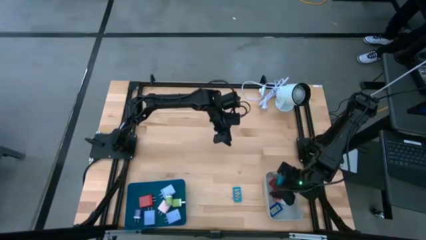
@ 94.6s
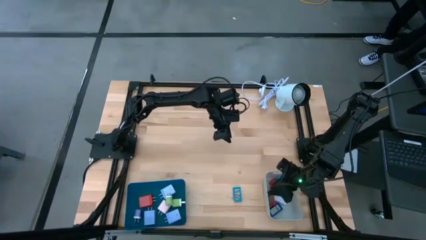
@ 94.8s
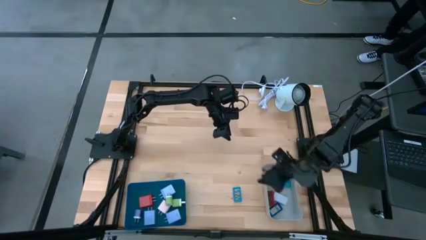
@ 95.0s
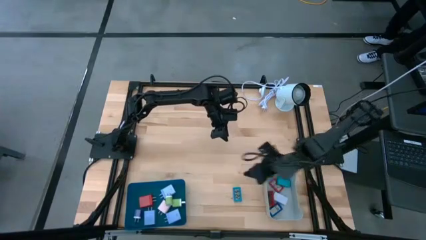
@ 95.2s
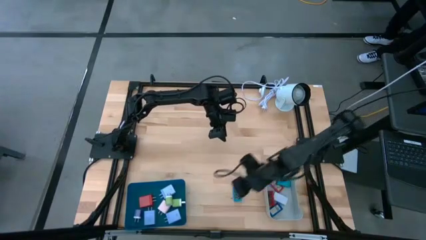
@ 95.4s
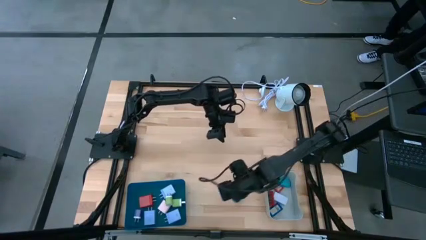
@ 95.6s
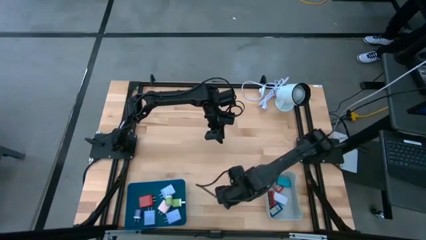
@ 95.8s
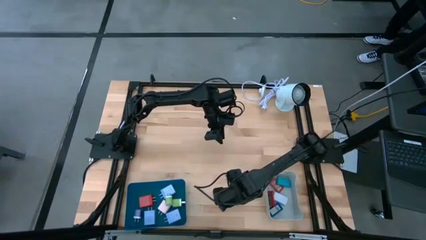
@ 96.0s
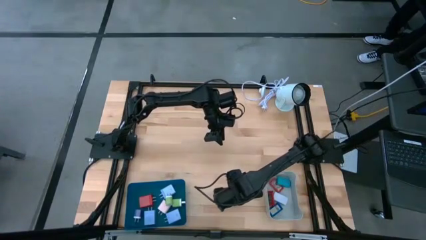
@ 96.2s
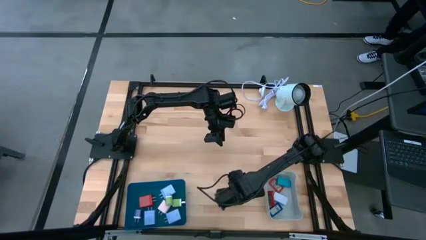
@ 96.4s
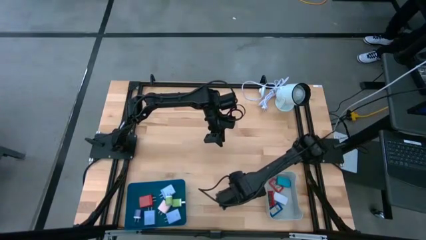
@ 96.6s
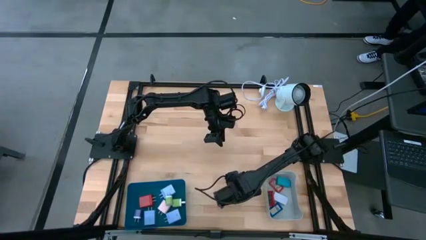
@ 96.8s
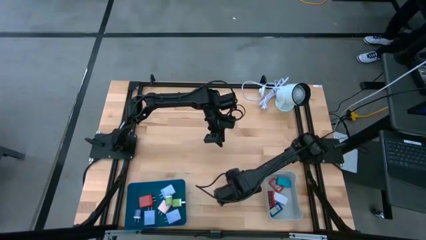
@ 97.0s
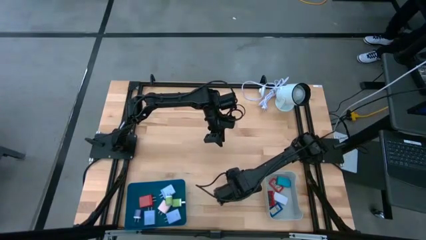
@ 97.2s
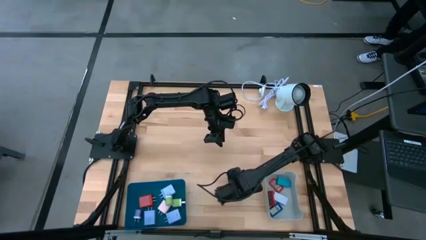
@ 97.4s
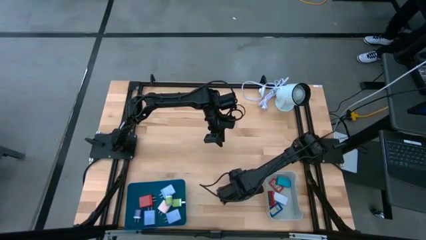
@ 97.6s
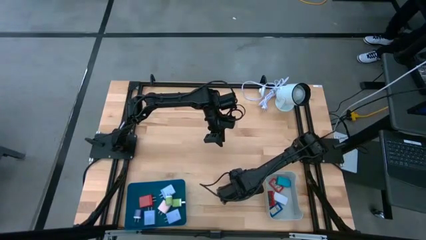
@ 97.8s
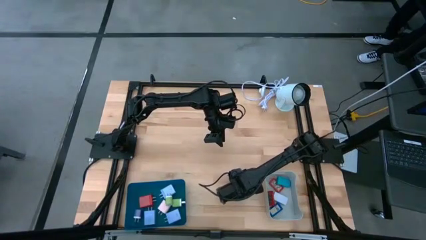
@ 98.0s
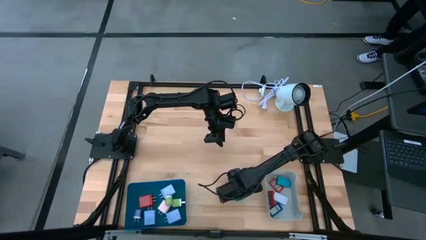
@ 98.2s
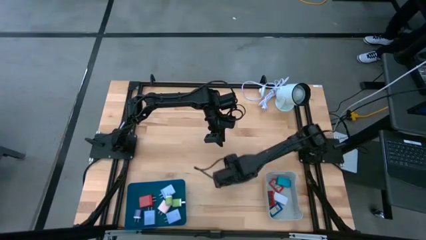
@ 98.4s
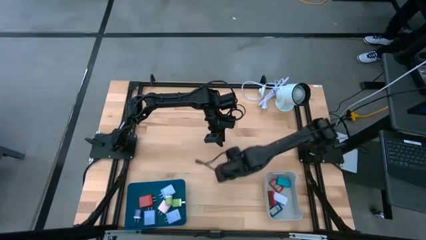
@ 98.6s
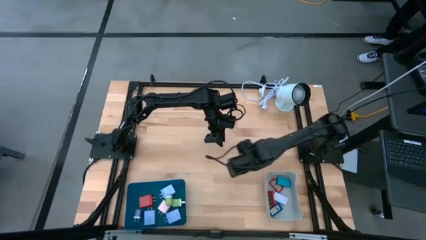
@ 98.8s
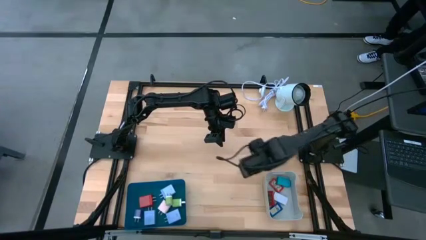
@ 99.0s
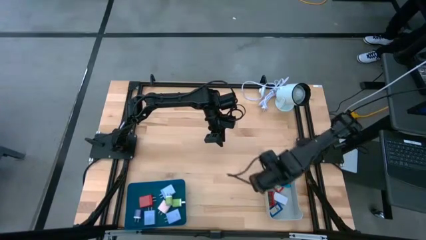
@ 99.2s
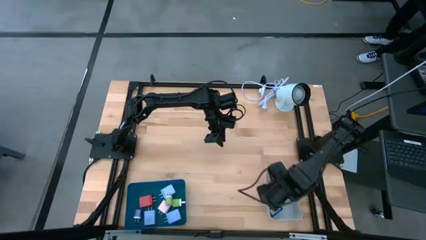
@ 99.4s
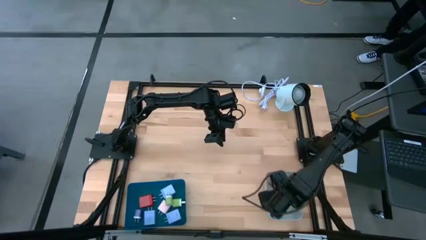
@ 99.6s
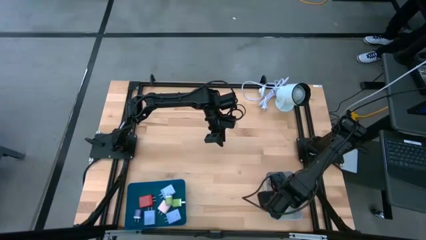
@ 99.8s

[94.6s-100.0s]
Task: Pick & Place Office items
Put the light blue digital clock into the gray bin

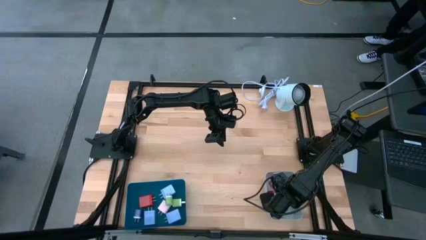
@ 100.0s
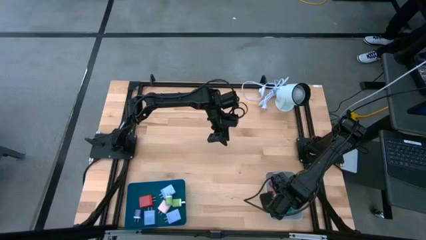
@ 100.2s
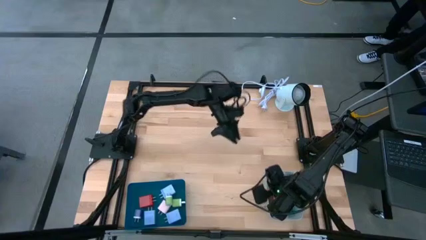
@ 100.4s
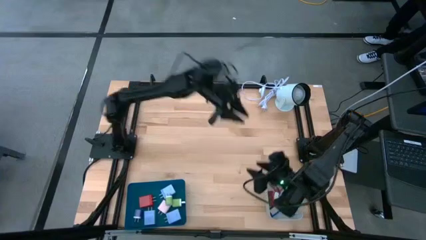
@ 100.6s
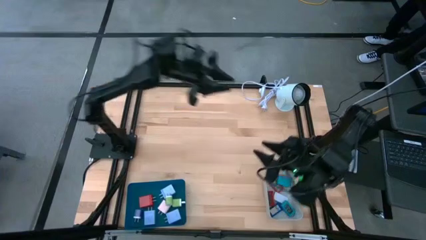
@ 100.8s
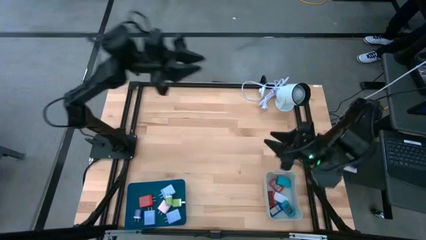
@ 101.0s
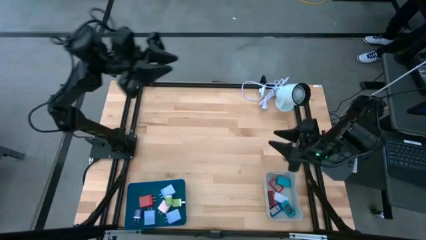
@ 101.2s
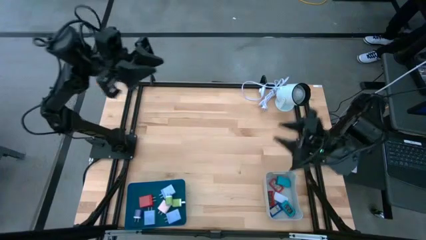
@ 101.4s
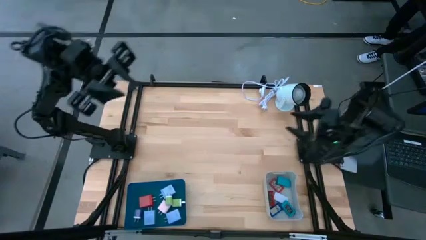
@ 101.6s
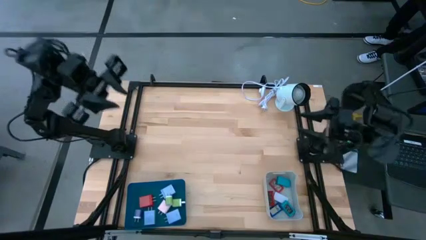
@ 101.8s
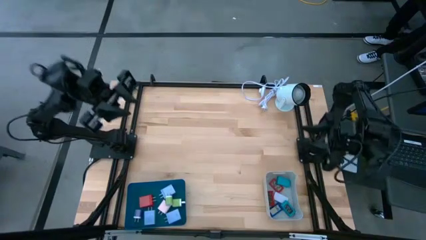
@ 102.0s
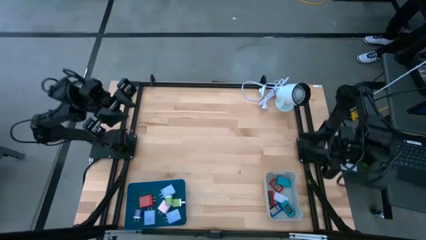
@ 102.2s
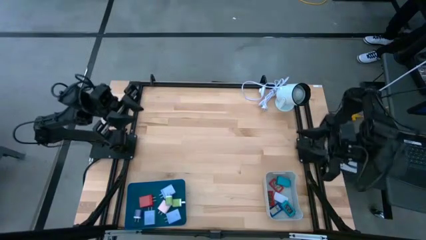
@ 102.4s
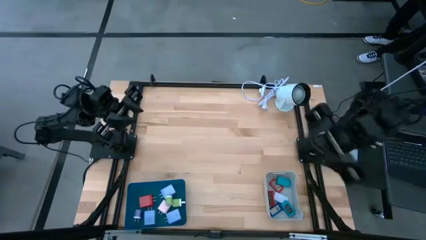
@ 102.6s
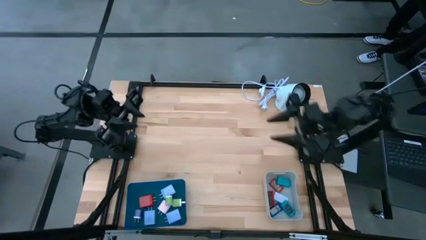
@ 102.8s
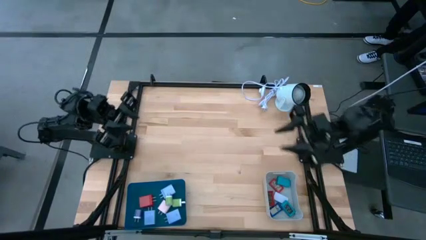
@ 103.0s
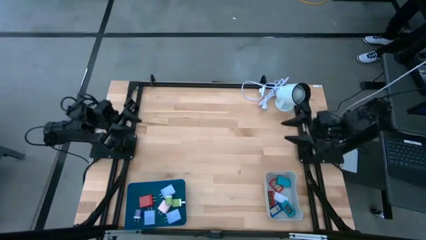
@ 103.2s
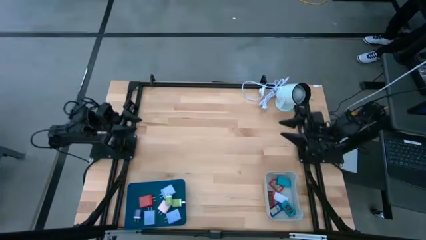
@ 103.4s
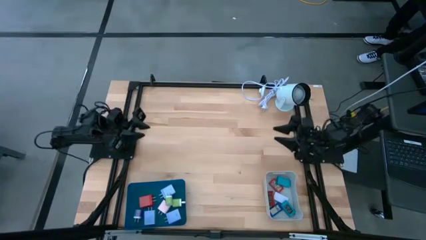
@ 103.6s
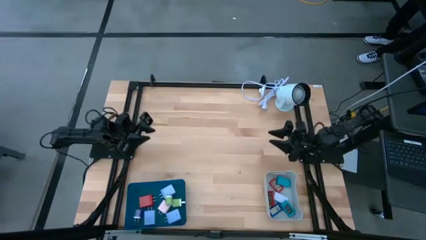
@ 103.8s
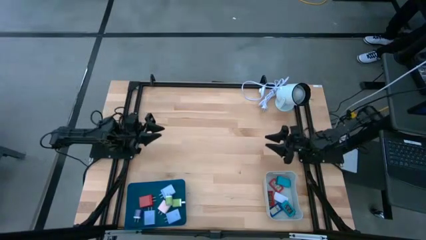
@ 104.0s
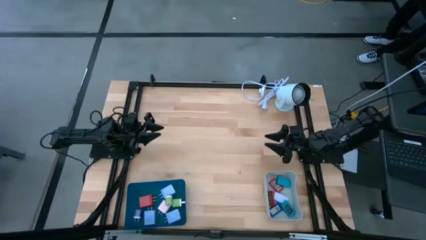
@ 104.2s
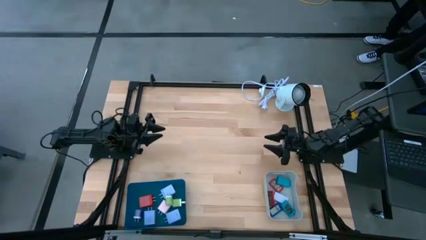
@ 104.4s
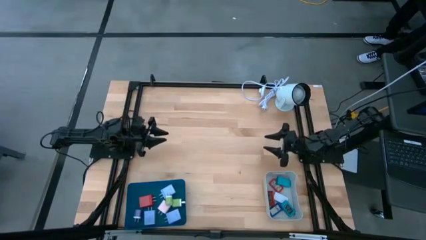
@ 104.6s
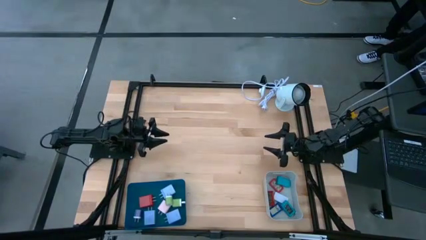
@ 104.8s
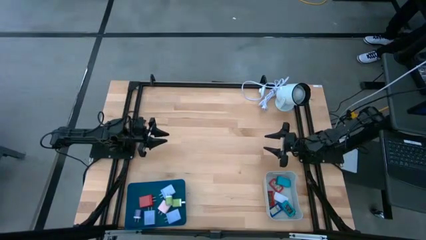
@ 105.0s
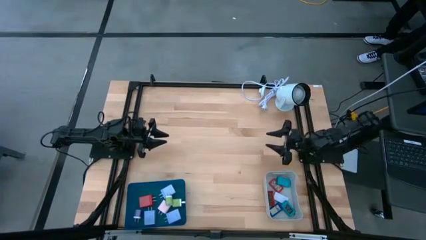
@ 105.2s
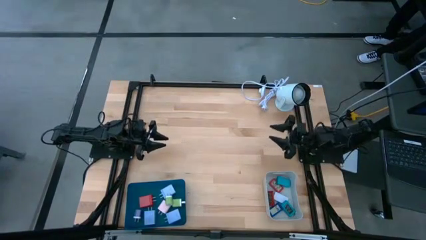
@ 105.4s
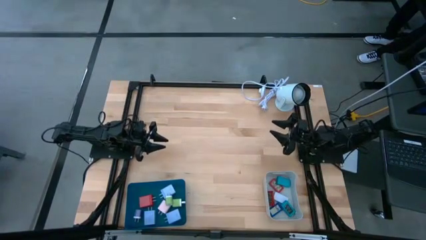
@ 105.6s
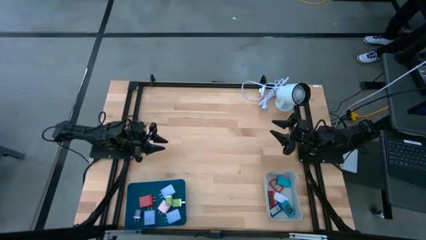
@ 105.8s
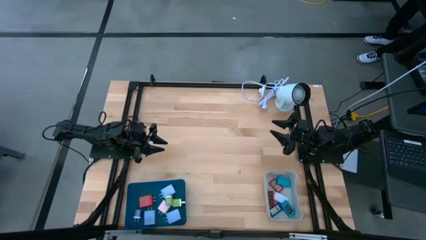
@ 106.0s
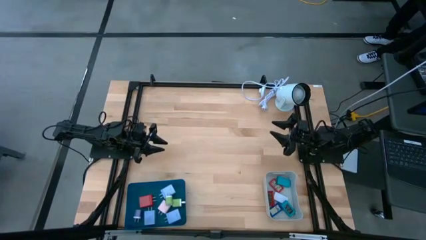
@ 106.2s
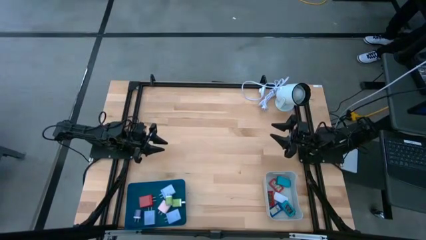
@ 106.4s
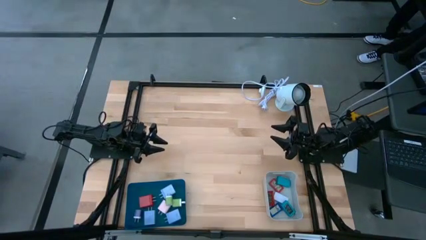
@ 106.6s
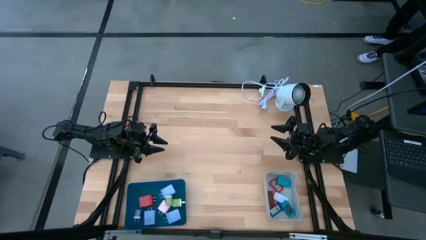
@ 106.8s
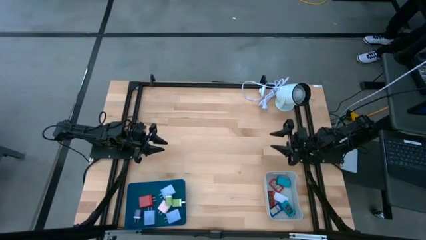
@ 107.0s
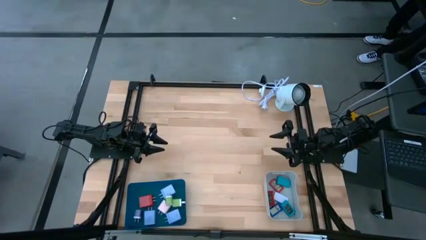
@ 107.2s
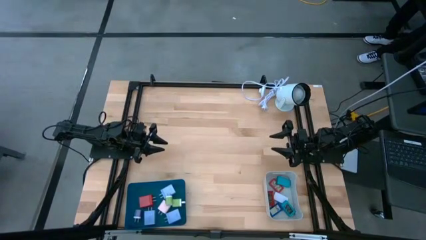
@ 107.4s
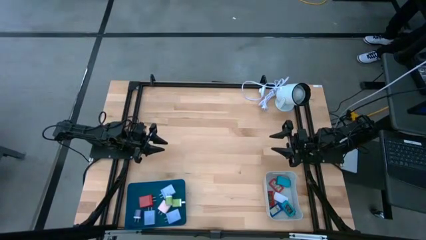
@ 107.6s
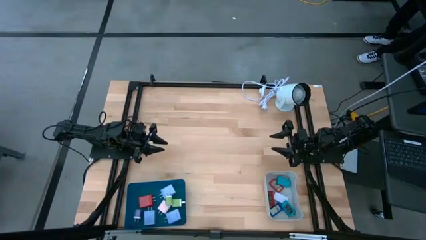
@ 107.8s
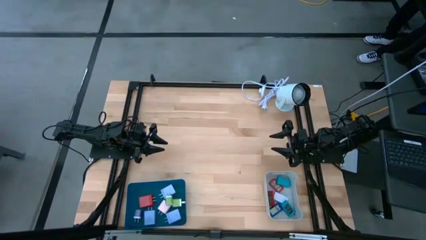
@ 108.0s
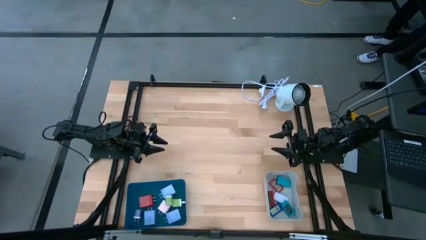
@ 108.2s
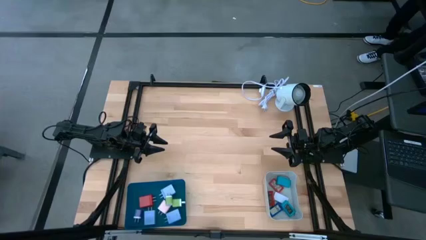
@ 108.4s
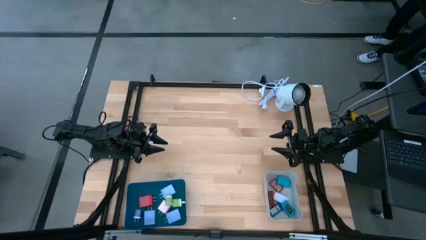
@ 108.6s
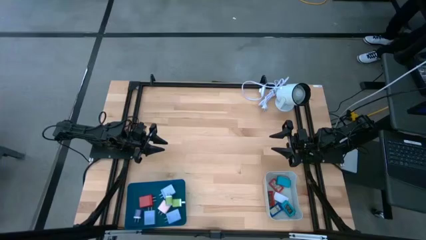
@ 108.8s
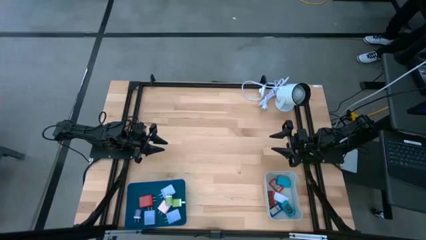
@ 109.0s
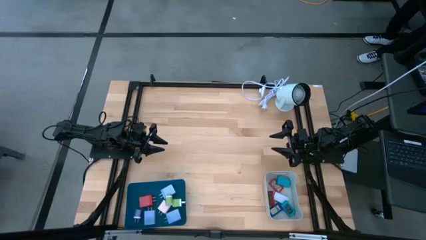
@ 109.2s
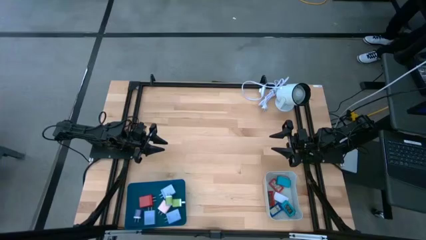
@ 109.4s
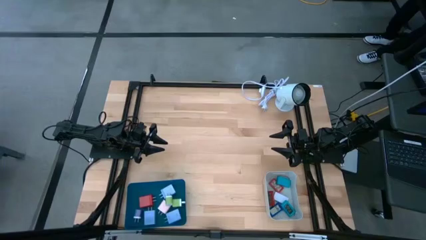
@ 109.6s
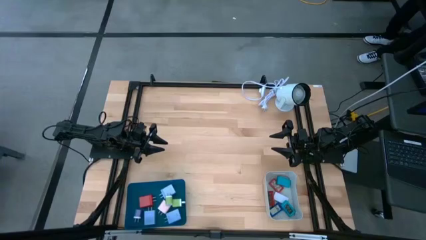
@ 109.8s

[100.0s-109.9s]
Return to Home Position
